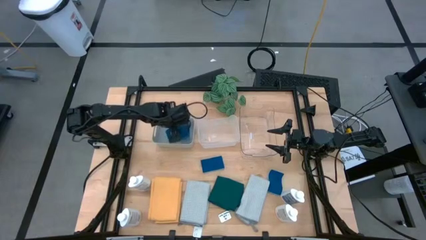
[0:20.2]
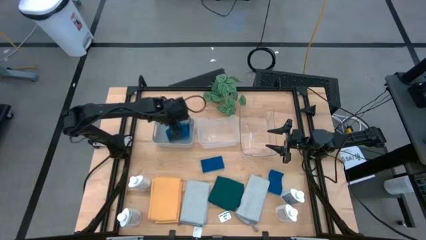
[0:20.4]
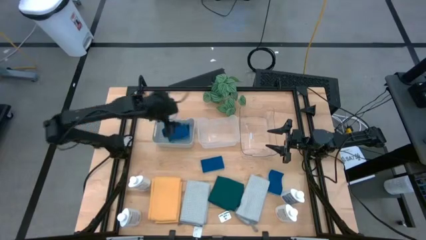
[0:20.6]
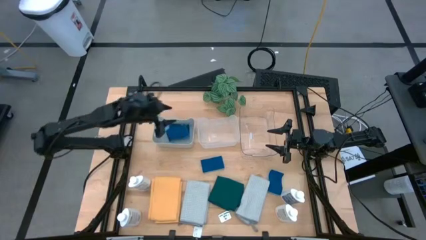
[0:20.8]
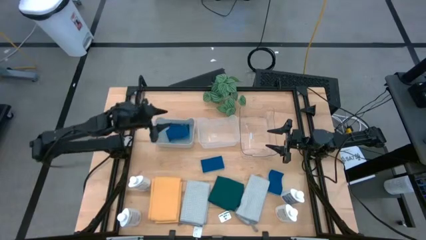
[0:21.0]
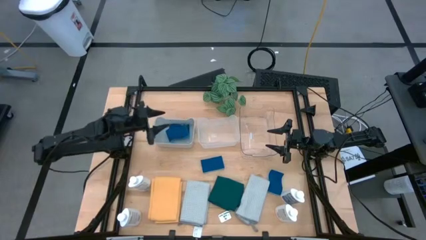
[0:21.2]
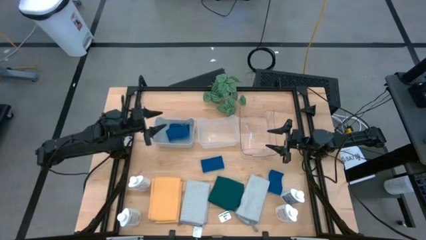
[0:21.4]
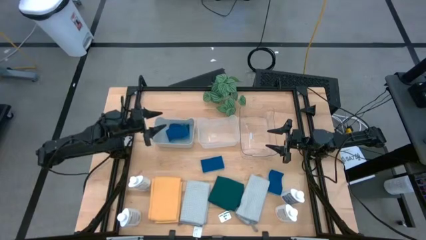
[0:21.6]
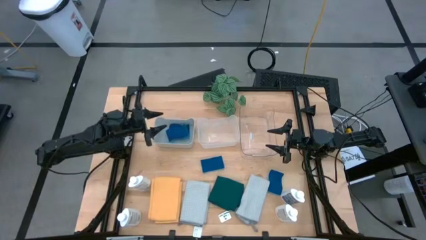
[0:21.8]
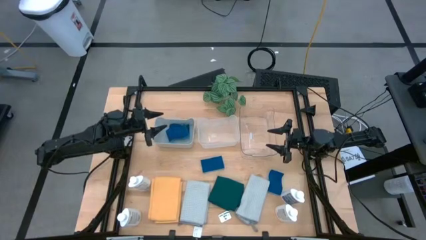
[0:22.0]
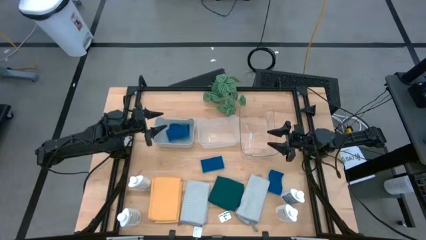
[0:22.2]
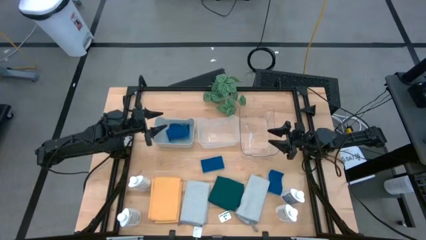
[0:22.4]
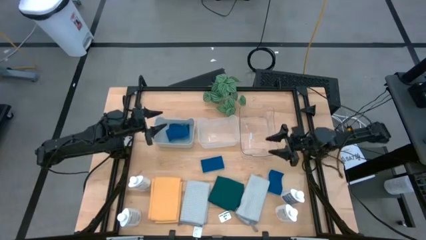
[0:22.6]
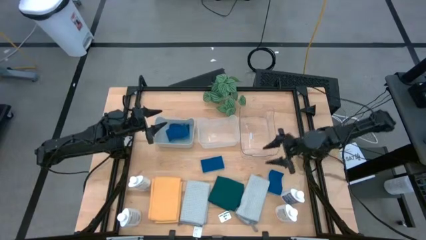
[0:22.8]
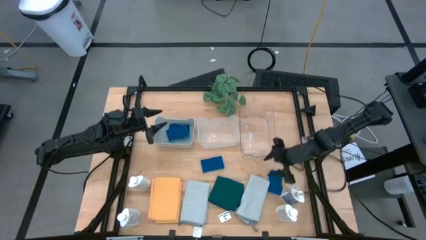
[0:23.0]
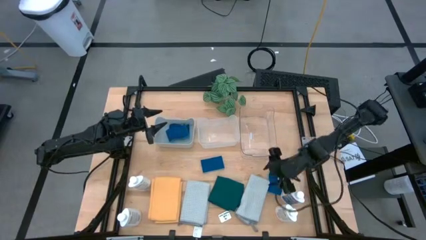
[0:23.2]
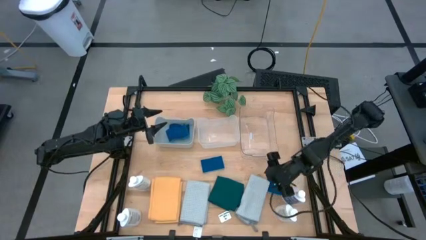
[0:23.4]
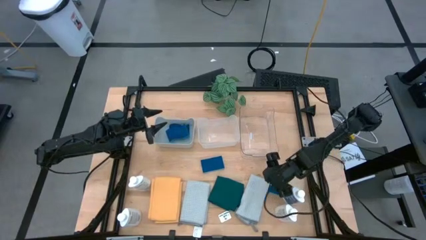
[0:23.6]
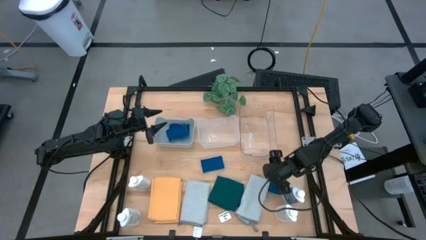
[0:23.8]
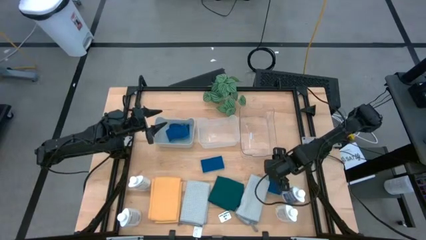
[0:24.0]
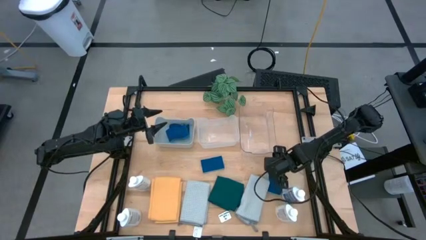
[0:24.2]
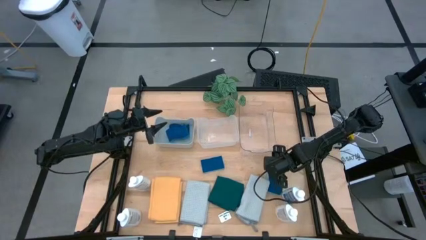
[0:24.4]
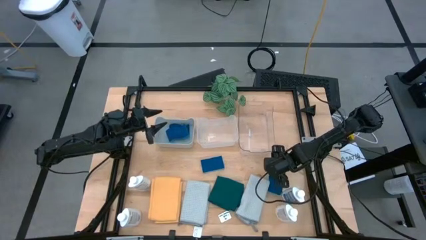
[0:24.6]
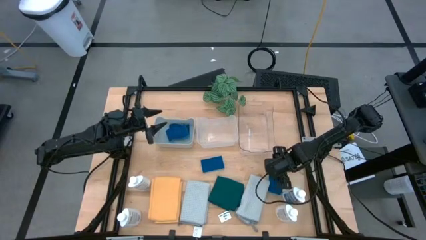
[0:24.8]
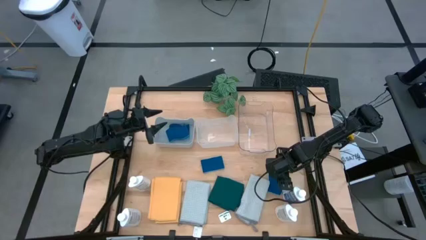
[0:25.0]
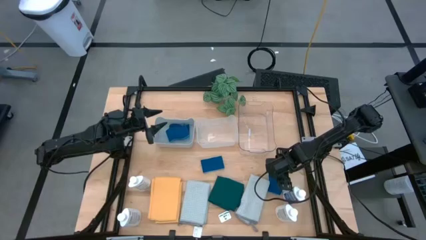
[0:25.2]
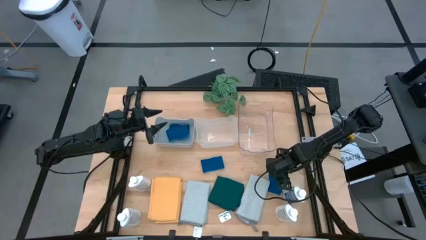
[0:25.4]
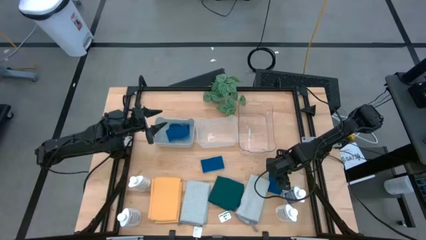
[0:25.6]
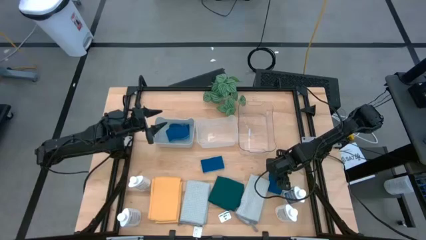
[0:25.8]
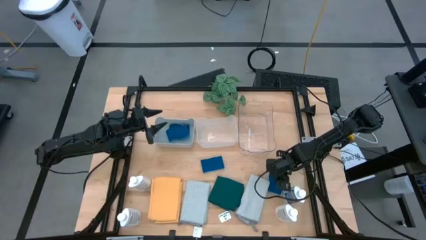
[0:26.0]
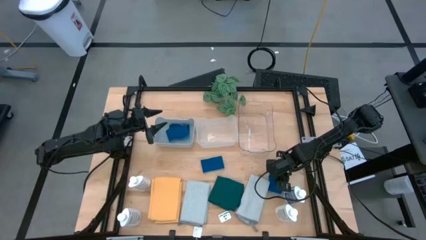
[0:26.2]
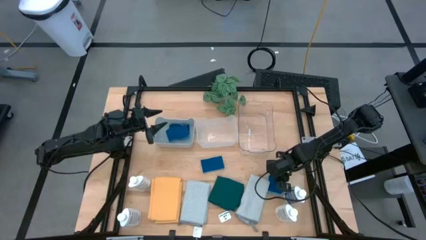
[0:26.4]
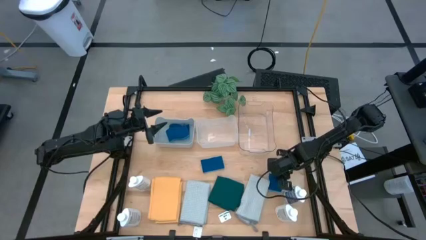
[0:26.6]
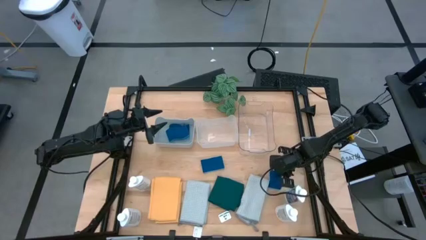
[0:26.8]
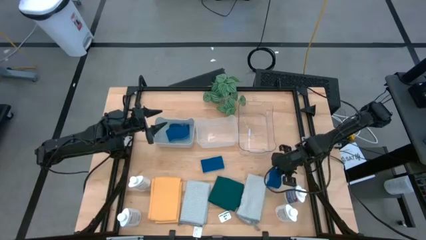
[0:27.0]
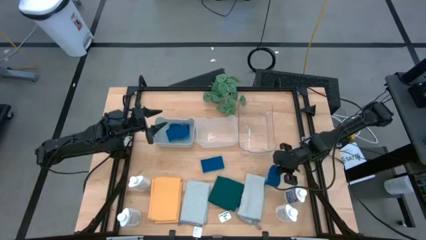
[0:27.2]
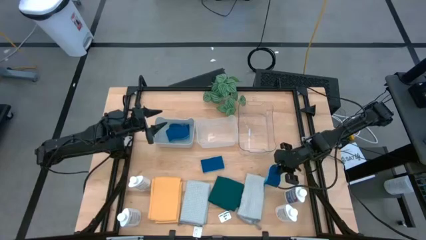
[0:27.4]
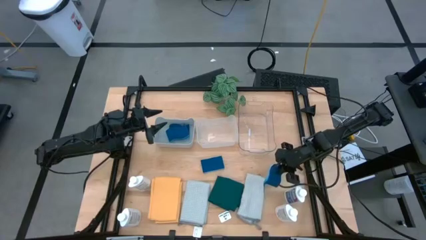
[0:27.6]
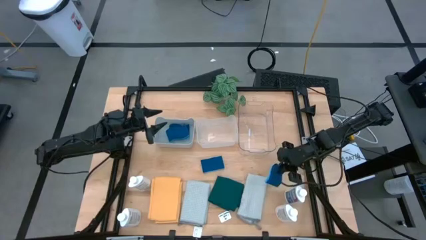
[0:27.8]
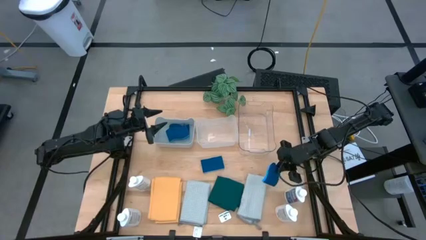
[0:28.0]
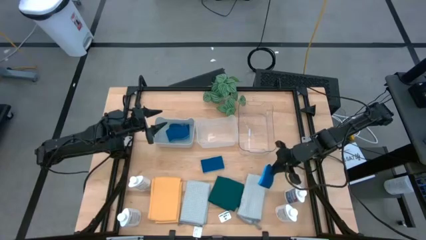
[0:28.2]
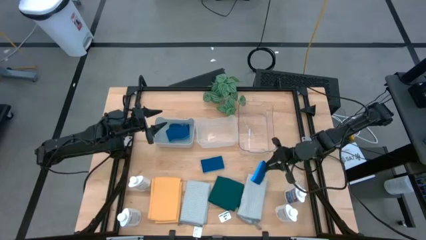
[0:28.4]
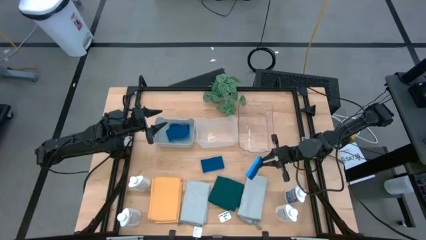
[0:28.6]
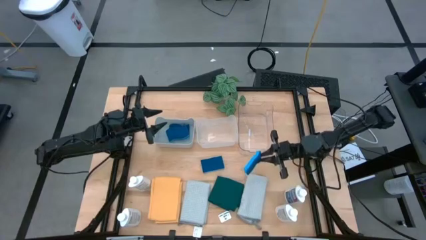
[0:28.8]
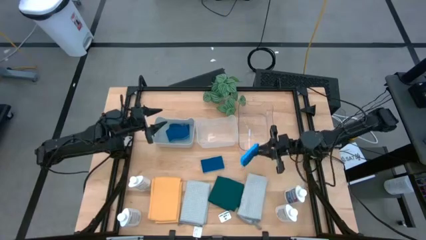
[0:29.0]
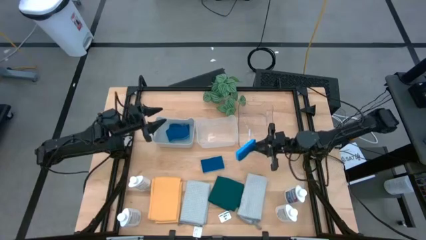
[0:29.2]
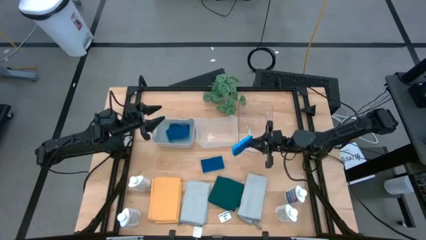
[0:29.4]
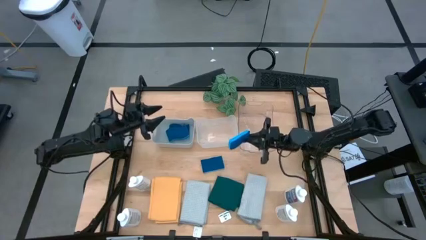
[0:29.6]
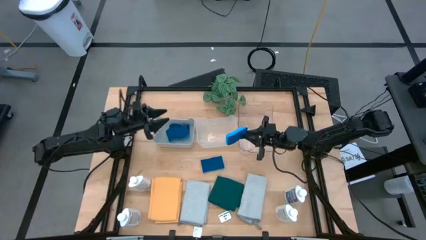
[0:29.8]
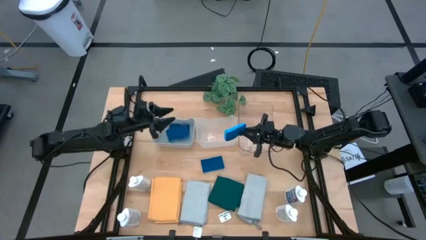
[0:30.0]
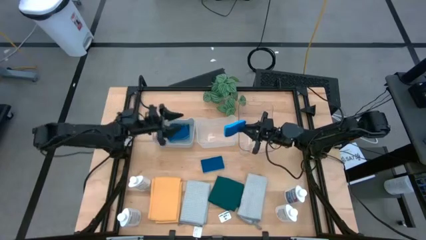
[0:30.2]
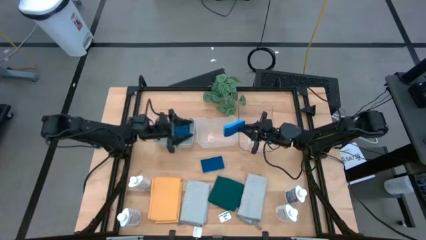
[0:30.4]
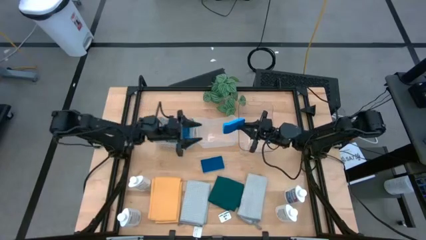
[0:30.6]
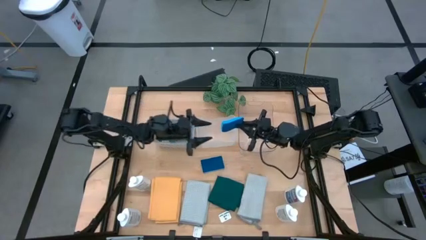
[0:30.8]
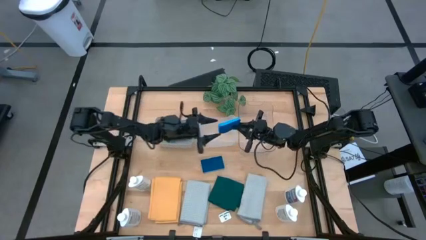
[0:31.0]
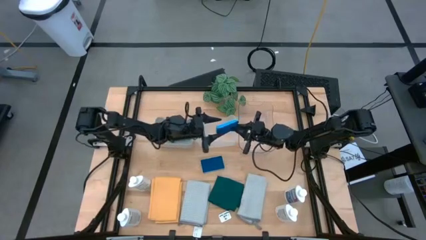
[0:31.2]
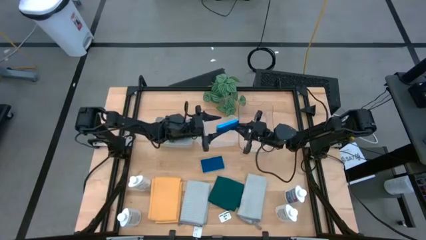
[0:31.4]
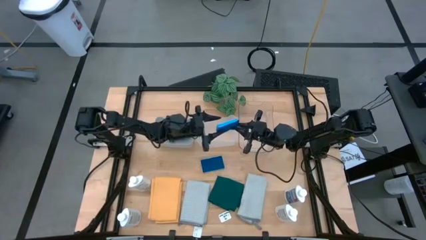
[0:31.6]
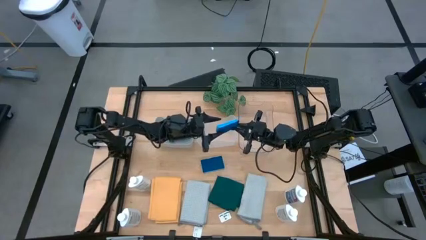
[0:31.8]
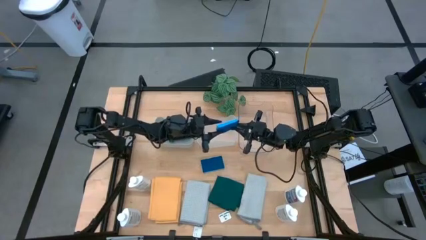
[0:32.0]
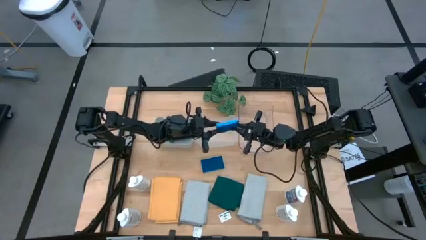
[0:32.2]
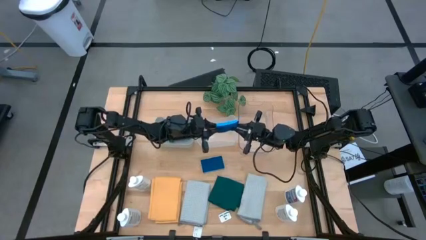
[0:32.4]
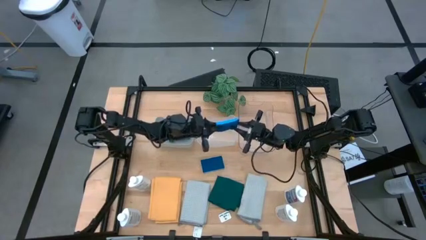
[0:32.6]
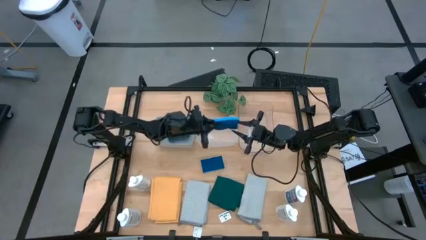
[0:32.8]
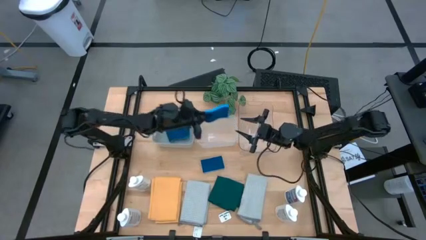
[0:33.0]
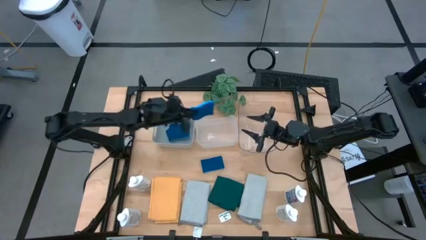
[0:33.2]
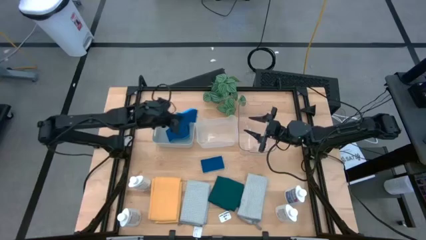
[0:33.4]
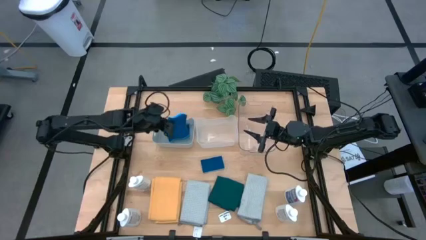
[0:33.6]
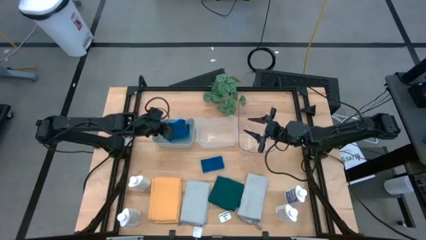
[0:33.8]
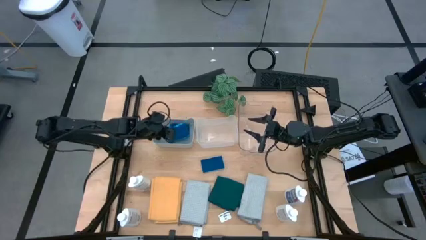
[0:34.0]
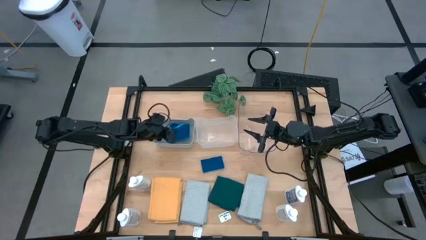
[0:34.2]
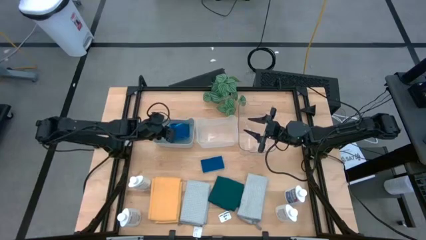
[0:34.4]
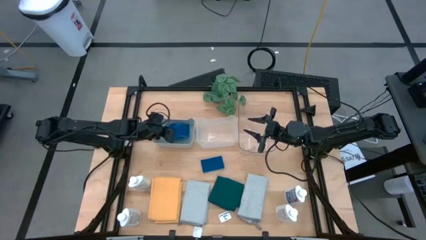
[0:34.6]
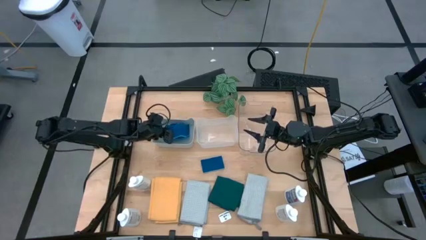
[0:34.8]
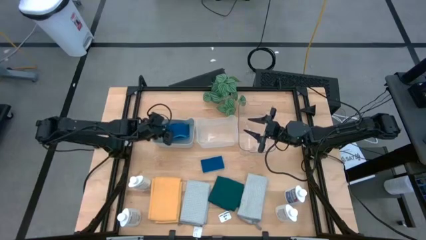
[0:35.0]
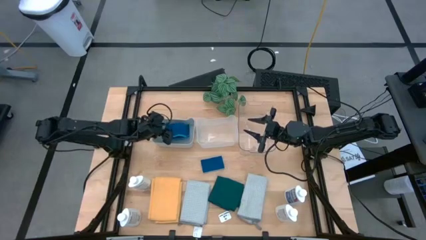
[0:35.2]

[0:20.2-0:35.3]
Task: Pick & Place Kitchen Items
Put the blue sponge into the gray bin
